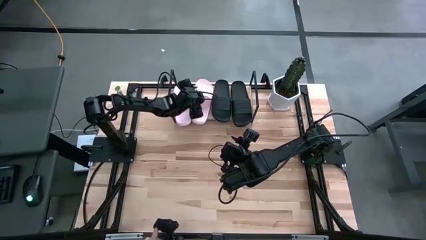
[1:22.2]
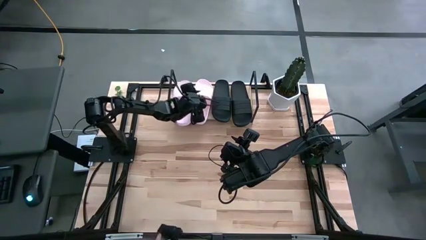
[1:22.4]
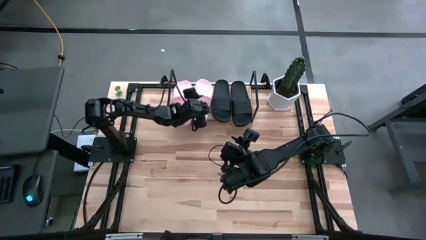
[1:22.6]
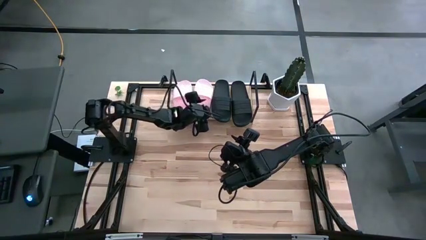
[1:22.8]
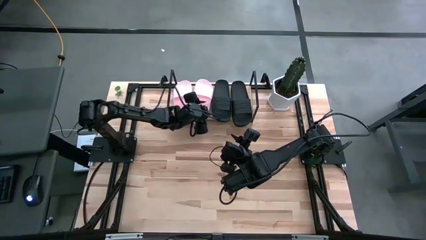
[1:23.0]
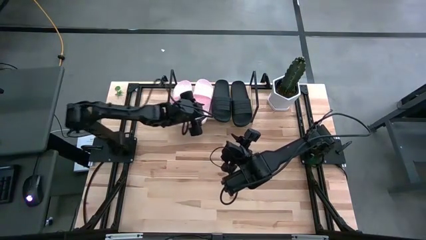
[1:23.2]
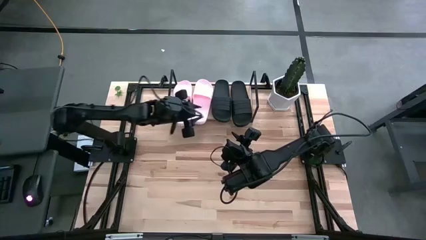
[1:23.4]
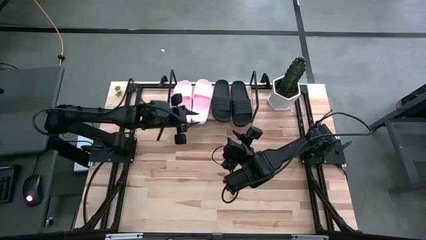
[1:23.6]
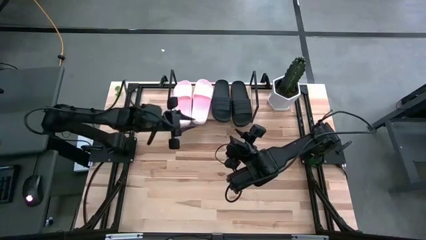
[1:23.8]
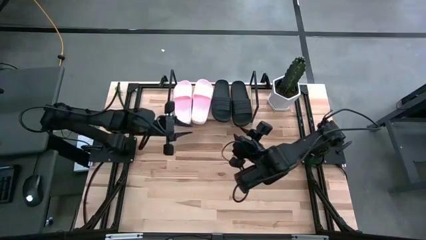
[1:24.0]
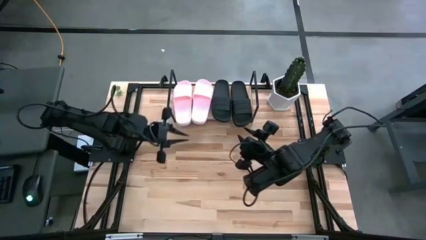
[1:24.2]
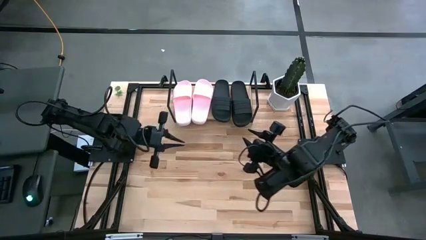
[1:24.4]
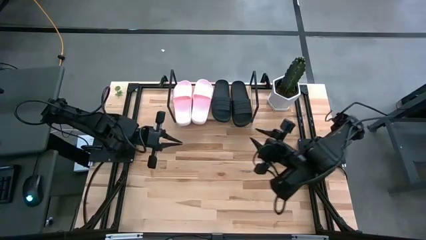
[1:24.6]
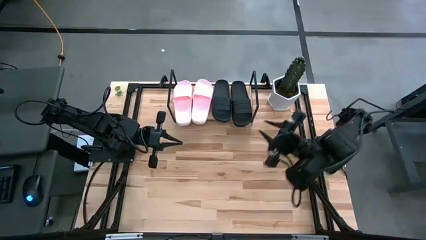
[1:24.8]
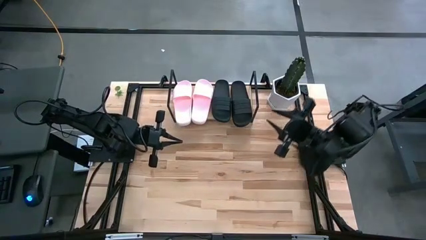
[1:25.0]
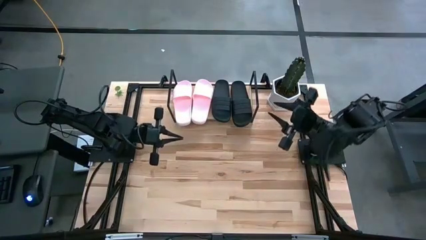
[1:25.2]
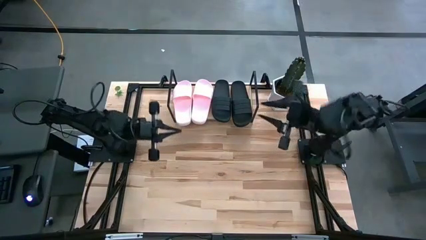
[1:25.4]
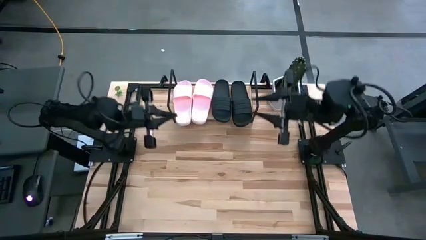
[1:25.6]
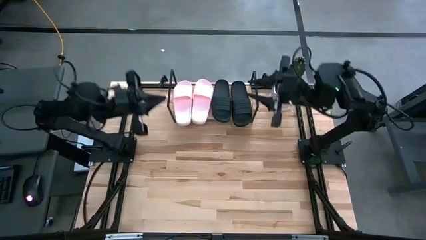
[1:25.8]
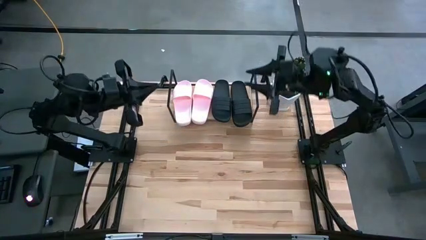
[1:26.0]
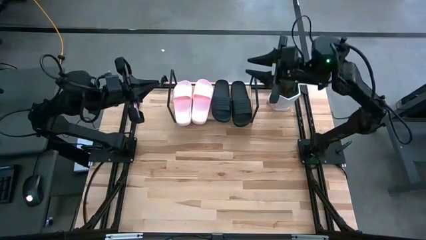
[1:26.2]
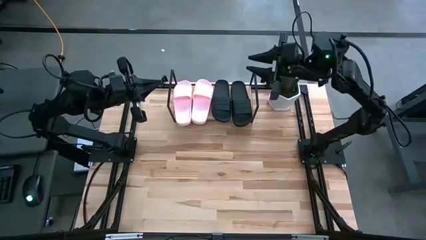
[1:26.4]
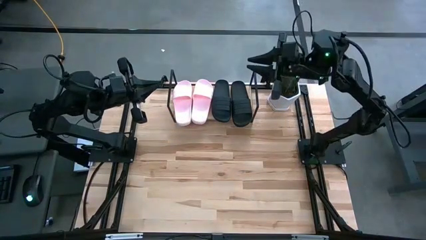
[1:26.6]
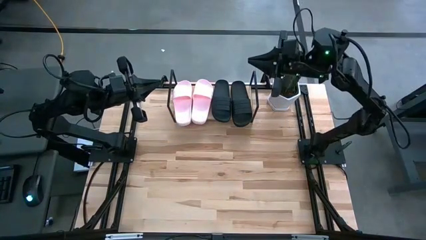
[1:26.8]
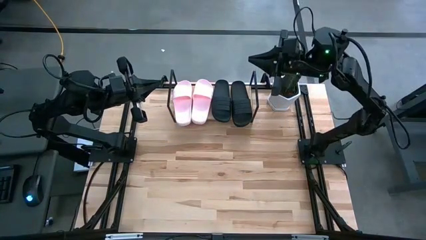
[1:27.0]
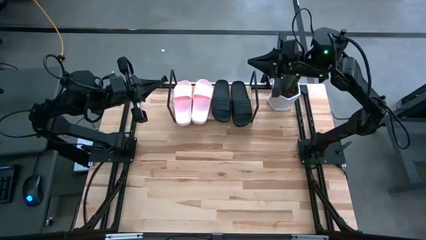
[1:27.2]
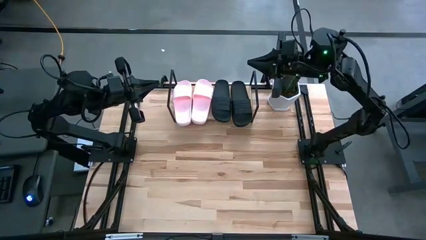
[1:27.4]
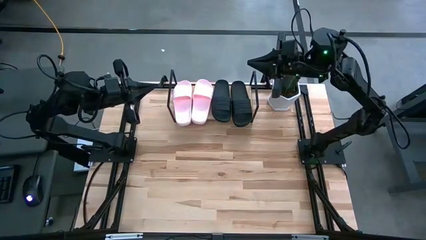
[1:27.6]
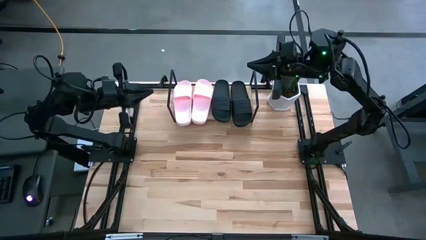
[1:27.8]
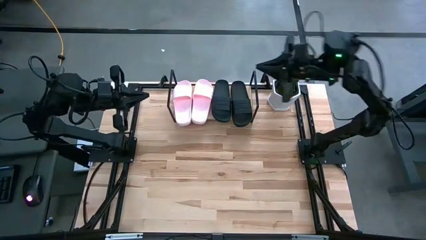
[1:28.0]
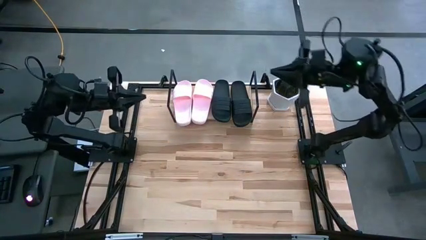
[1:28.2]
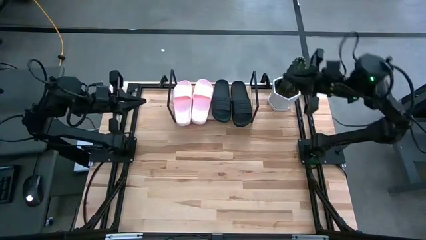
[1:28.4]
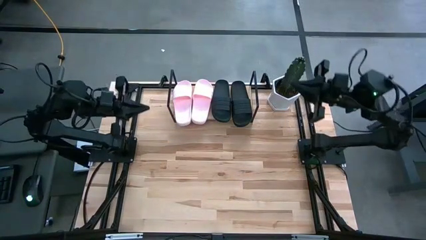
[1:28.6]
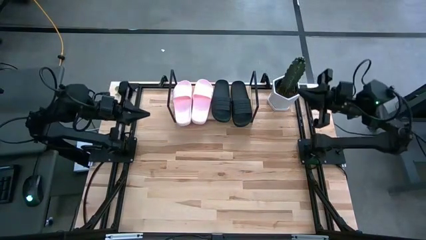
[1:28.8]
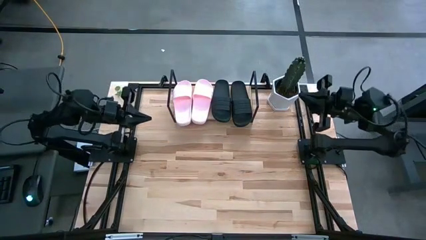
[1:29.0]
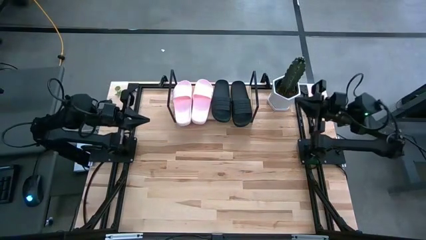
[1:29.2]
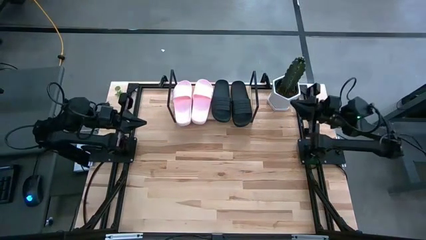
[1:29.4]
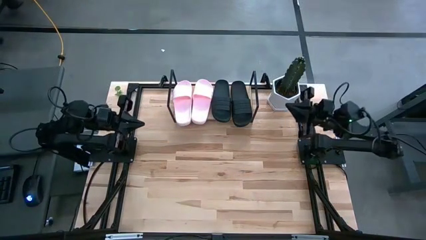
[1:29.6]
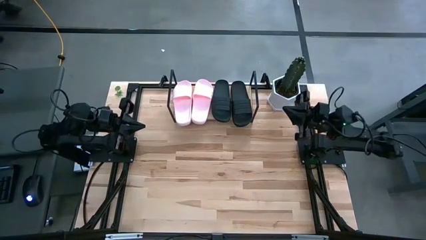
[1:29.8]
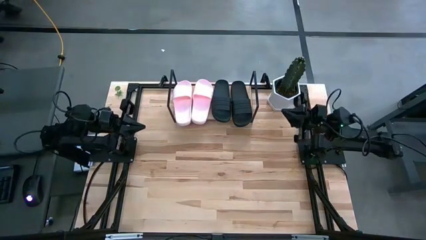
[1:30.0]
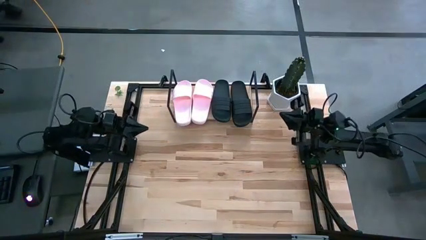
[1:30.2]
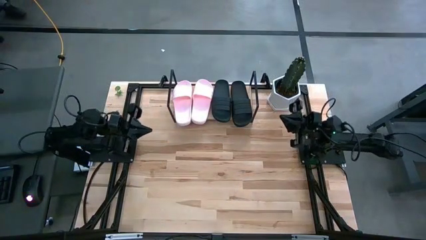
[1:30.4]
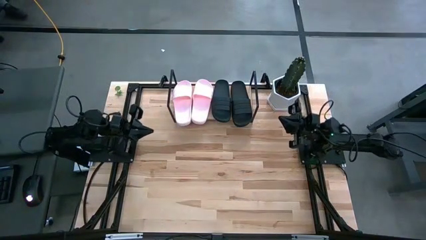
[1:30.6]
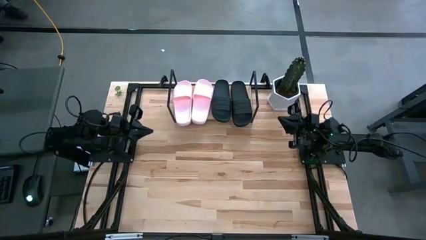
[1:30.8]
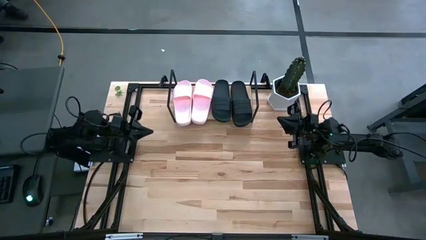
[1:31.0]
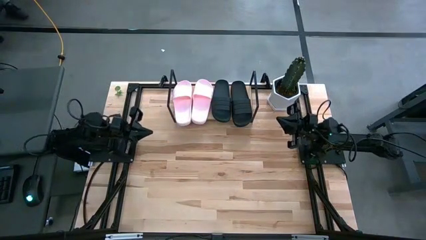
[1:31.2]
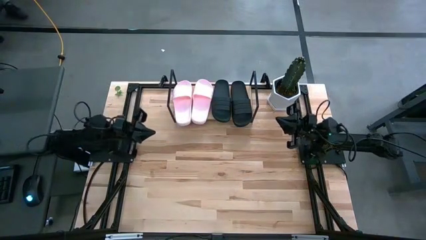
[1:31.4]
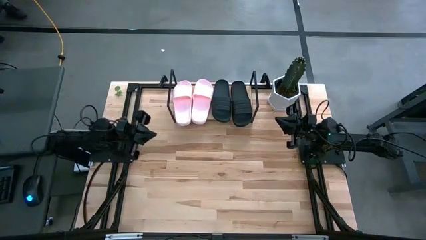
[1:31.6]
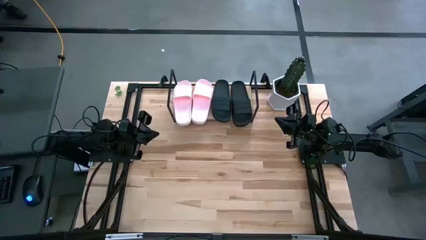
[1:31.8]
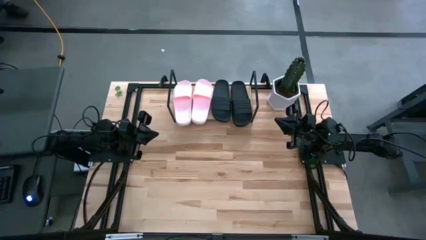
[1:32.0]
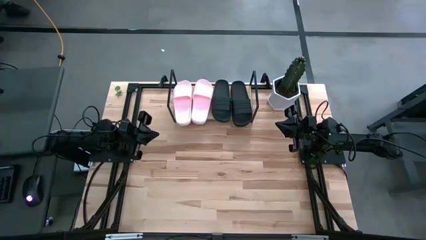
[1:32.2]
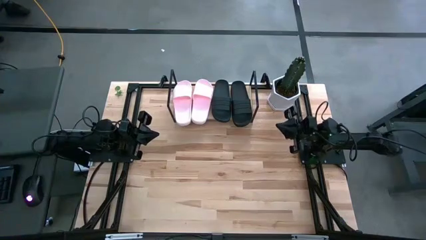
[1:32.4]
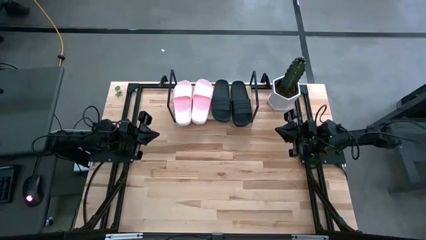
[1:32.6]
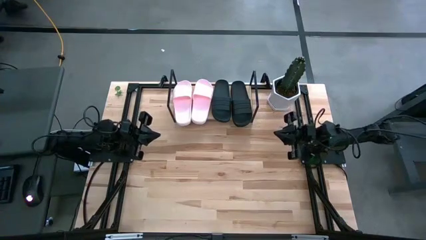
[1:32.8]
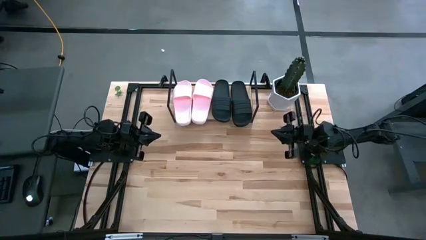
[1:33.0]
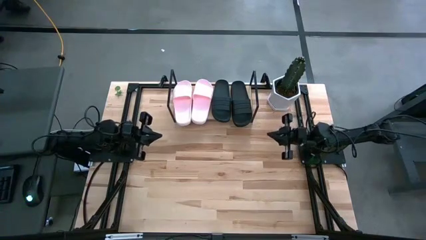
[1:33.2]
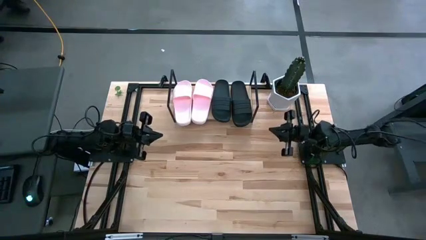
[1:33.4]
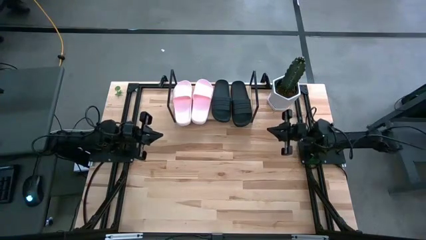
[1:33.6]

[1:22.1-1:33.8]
Task: Pick and place slides into the shelf
Return to Home Position
